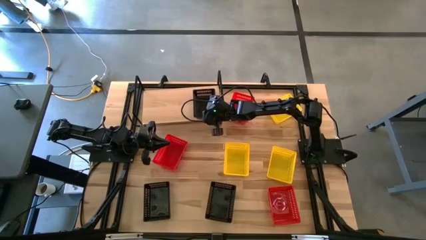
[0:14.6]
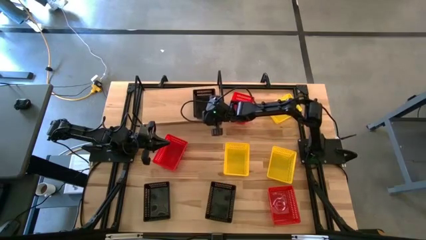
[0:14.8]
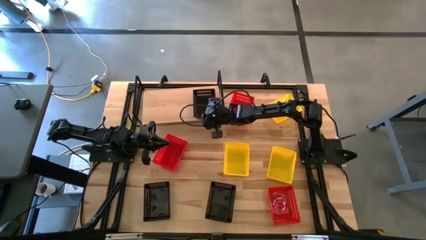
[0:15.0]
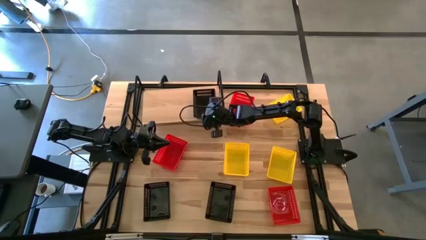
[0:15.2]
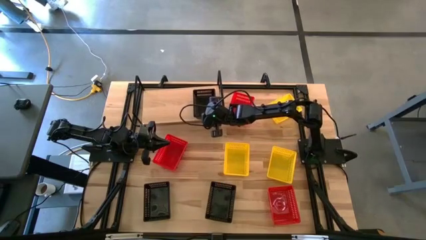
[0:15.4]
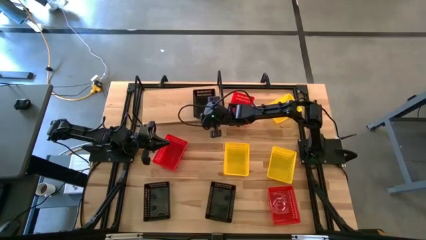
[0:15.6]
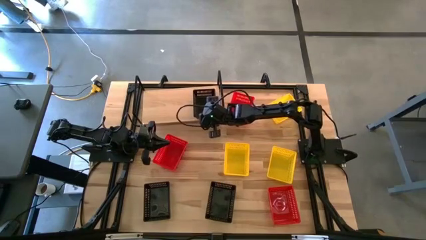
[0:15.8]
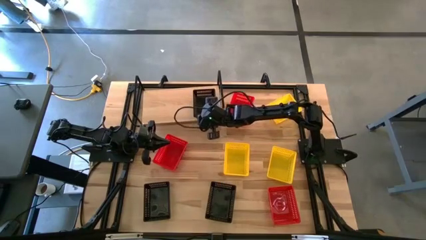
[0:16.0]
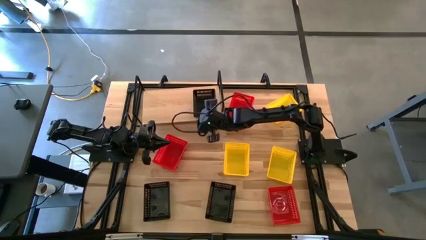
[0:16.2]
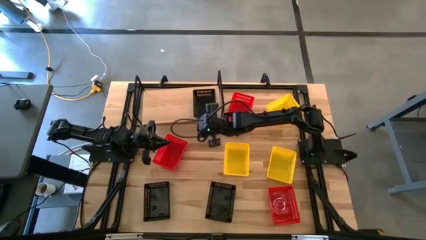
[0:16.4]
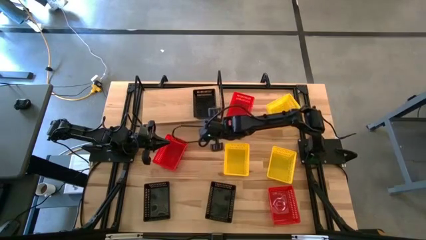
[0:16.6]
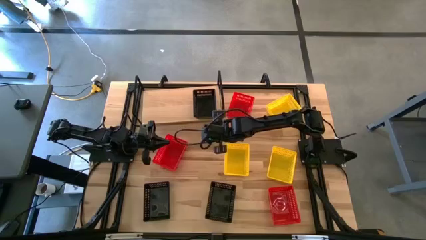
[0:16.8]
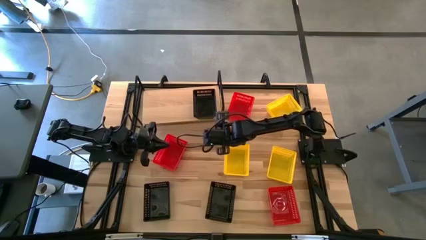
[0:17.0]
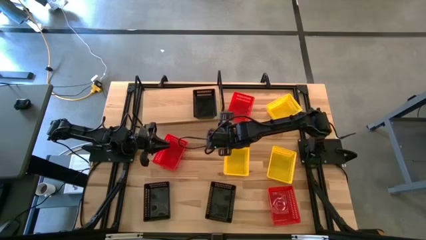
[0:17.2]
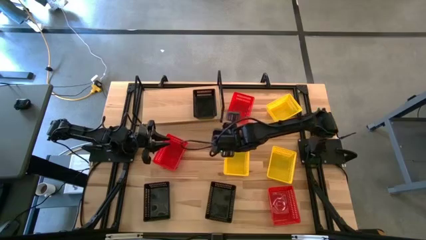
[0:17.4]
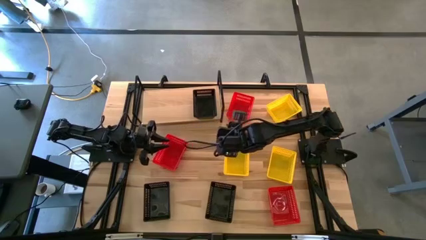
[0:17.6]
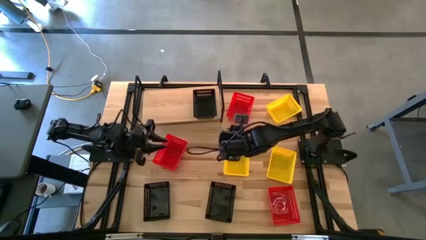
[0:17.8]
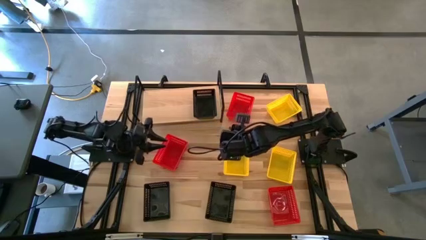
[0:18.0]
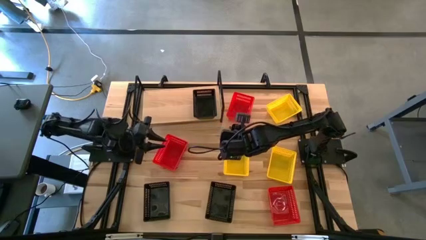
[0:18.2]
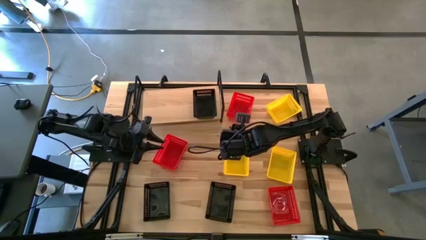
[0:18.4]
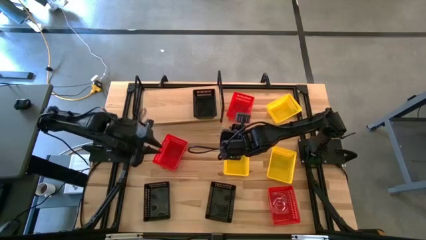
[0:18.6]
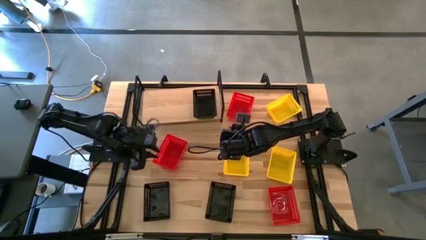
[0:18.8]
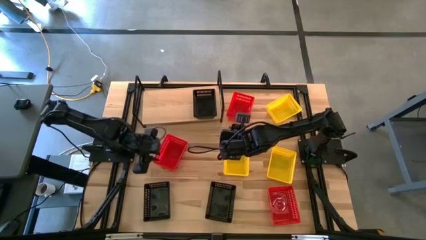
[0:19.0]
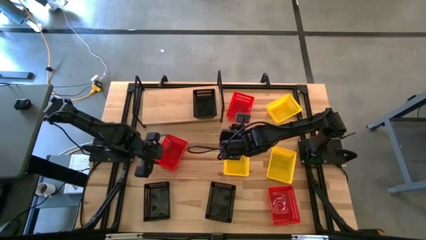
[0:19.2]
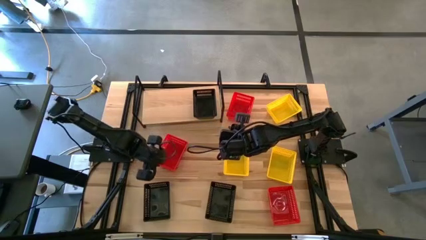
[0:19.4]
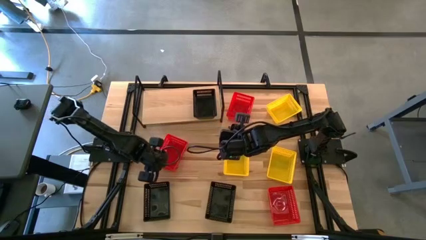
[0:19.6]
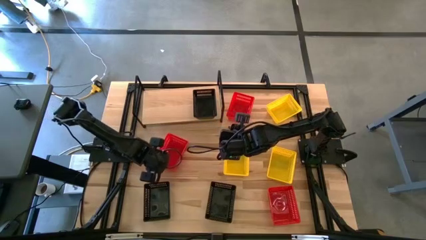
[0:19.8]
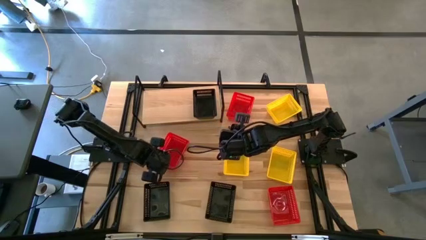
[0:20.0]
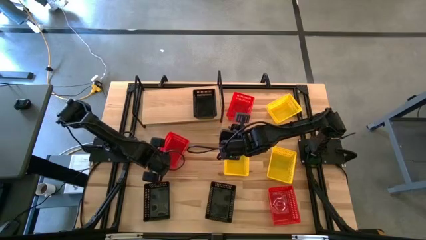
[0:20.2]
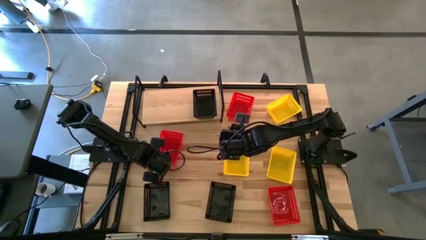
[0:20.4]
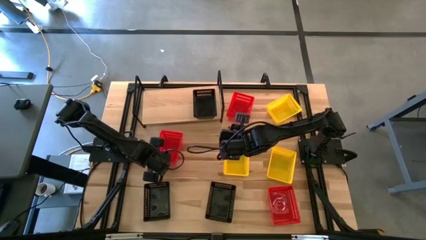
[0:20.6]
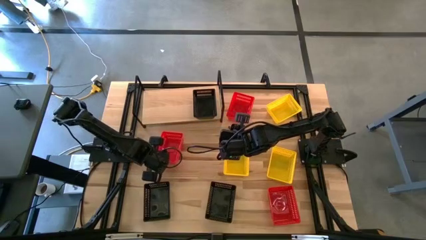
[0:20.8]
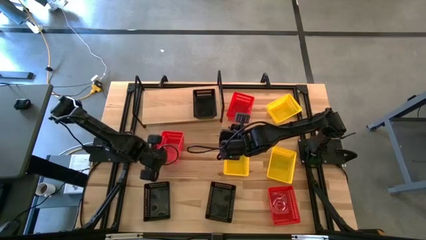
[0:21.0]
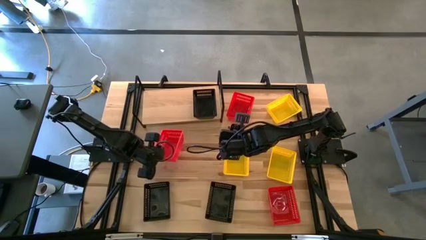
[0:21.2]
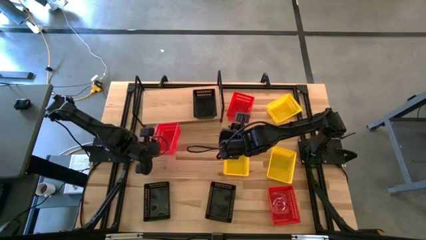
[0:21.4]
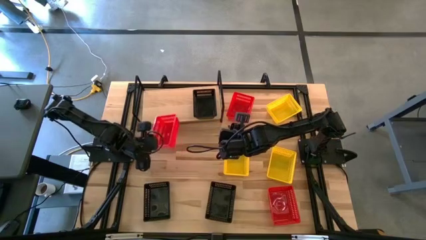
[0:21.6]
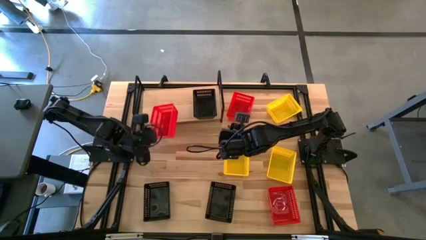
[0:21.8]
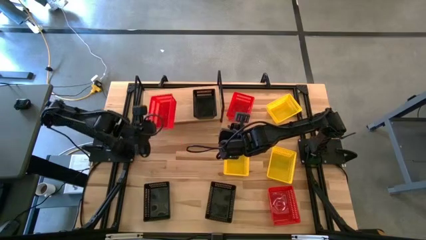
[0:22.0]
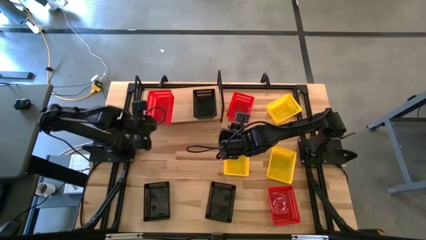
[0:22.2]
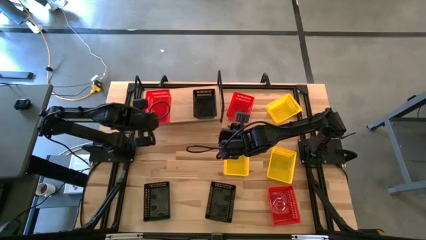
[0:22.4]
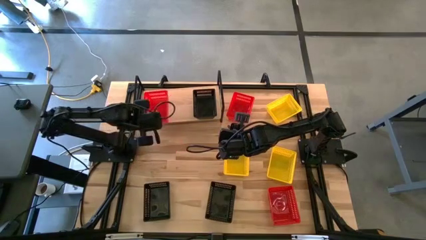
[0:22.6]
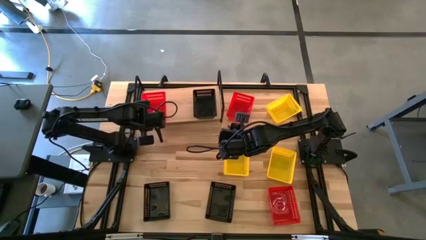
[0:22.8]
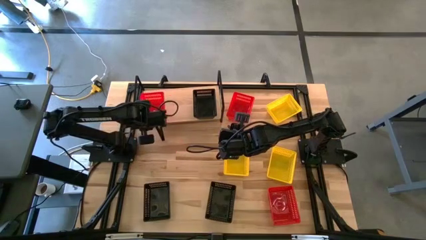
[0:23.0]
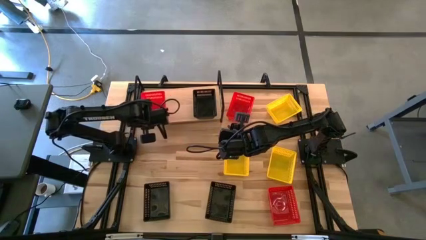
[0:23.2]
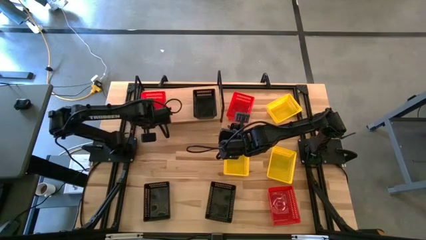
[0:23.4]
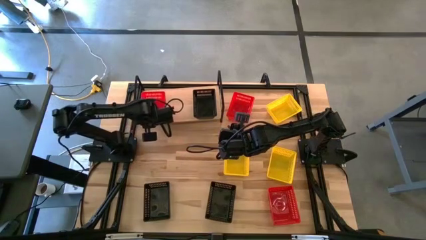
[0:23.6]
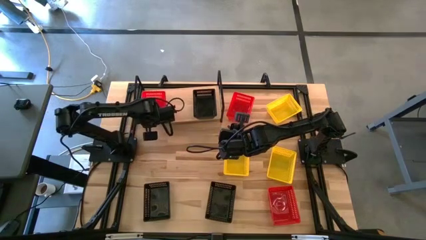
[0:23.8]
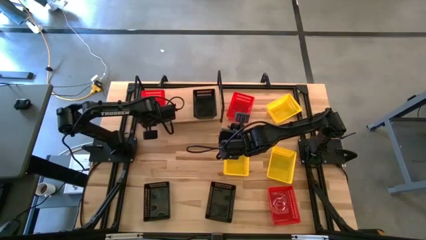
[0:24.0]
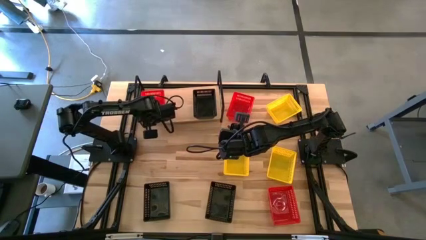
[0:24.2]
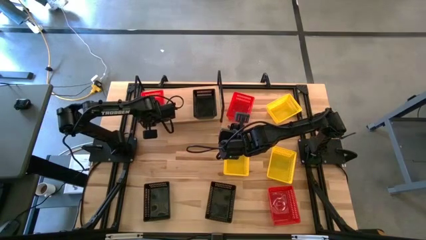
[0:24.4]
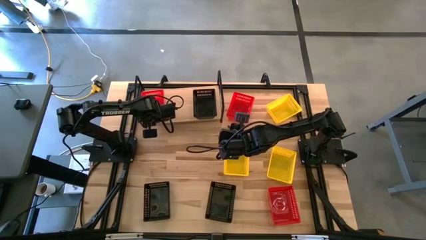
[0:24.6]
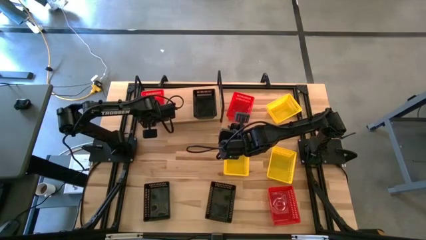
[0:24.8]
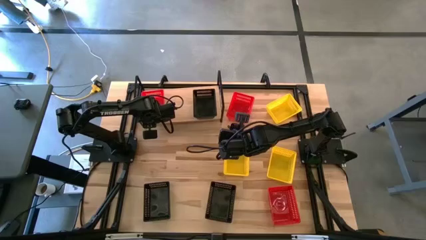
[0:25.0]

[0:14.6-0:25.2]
Task: Stack baskets on shelf by color
Put the left red bin on the shelf

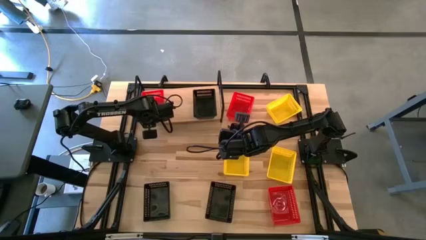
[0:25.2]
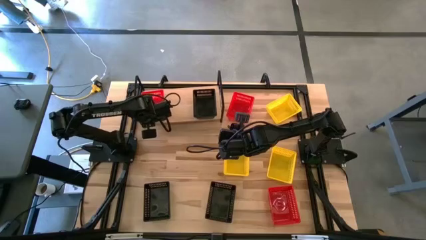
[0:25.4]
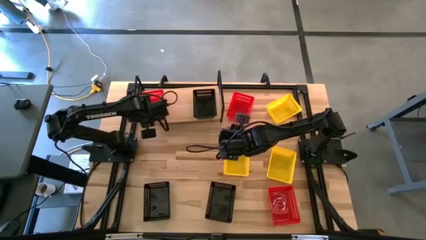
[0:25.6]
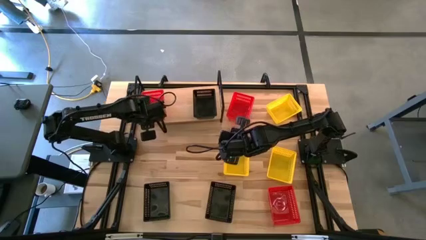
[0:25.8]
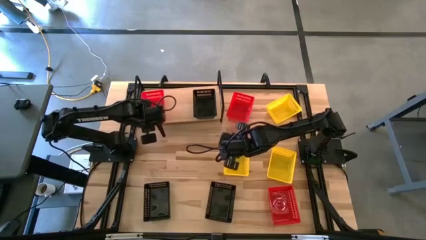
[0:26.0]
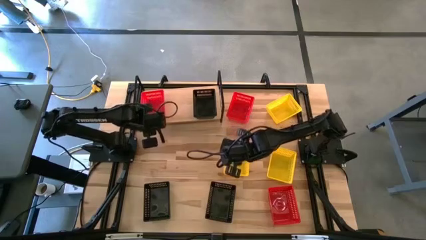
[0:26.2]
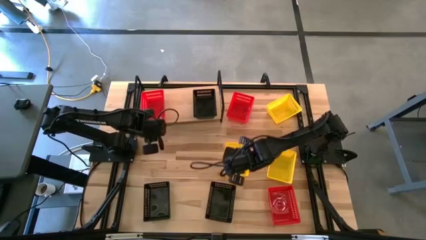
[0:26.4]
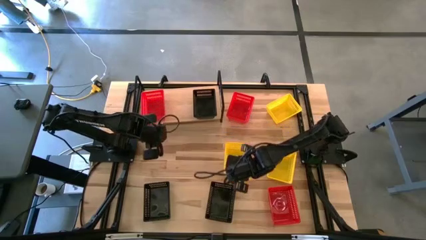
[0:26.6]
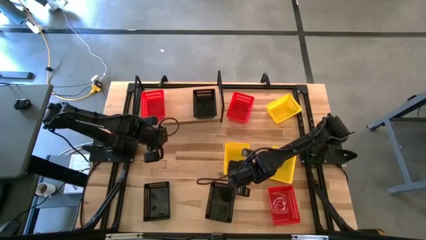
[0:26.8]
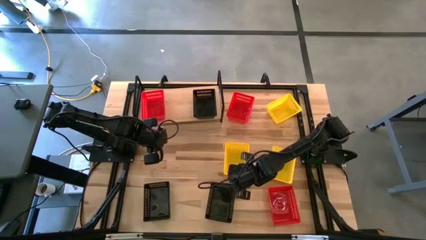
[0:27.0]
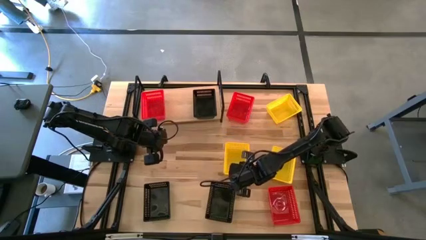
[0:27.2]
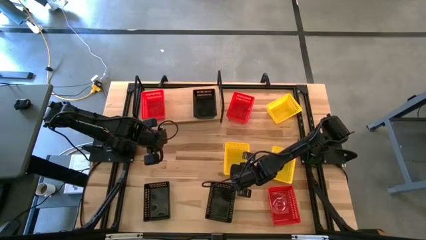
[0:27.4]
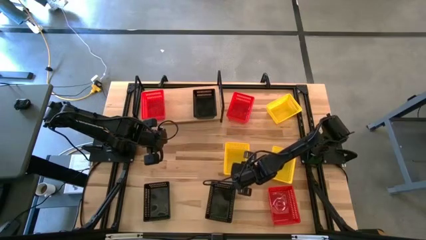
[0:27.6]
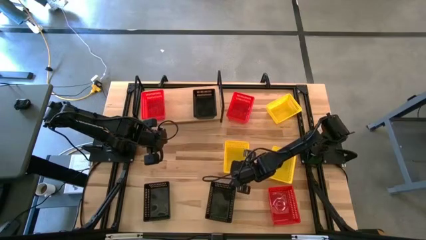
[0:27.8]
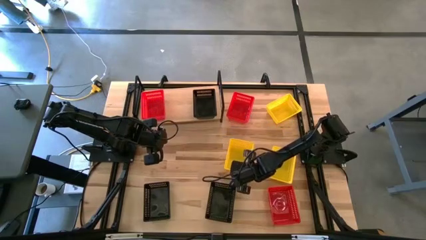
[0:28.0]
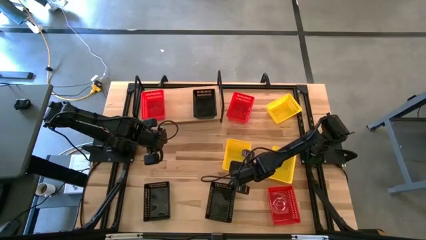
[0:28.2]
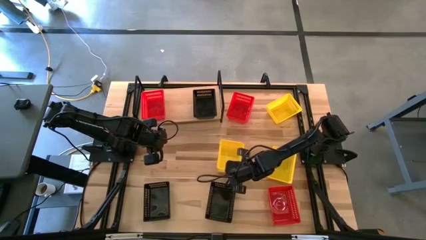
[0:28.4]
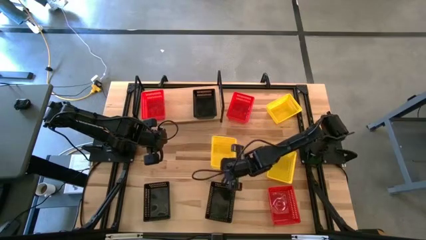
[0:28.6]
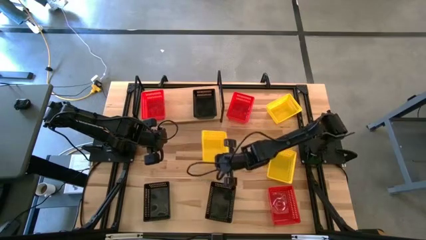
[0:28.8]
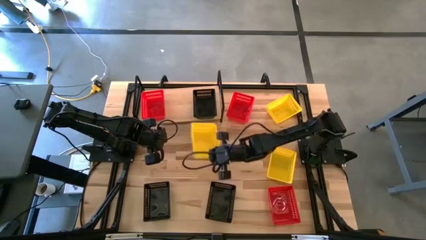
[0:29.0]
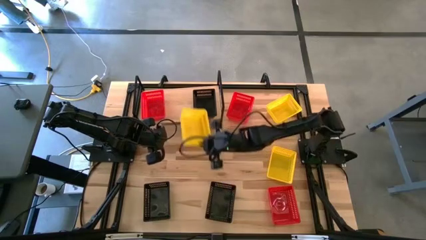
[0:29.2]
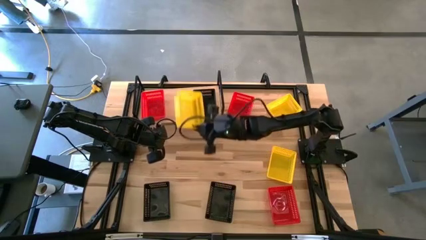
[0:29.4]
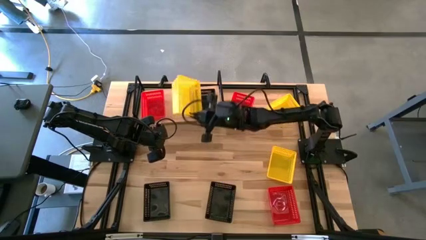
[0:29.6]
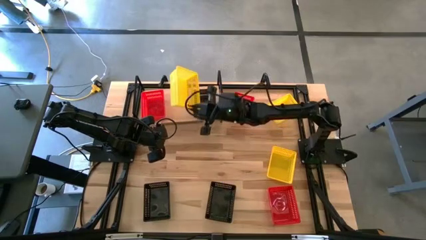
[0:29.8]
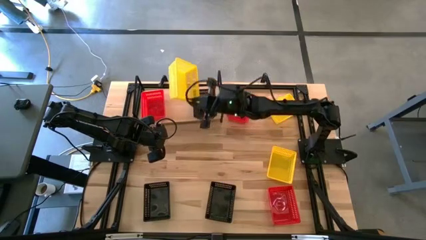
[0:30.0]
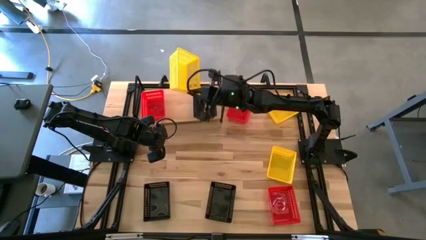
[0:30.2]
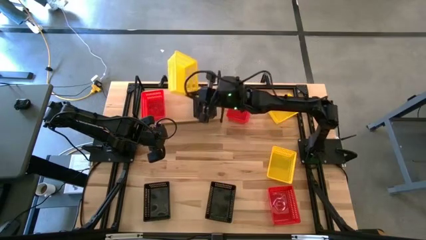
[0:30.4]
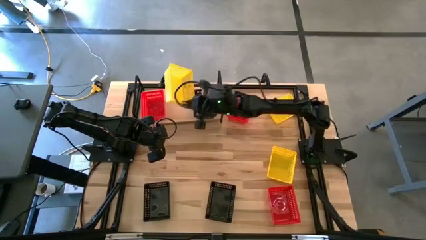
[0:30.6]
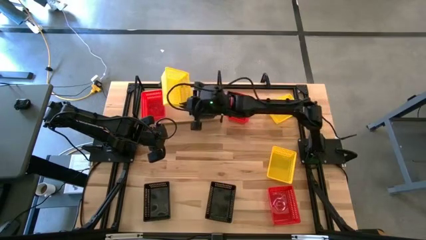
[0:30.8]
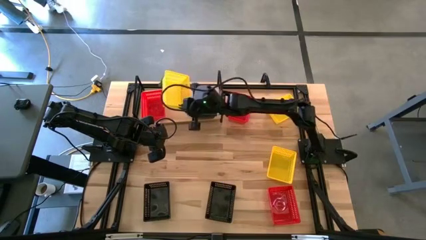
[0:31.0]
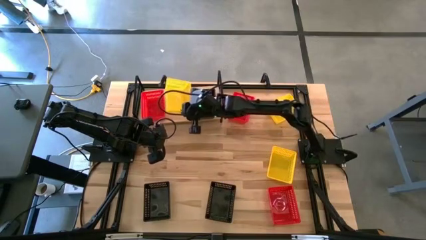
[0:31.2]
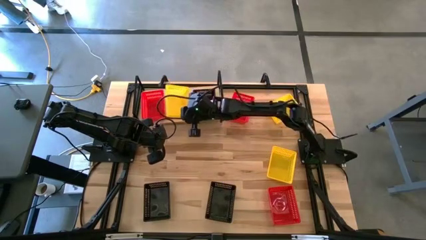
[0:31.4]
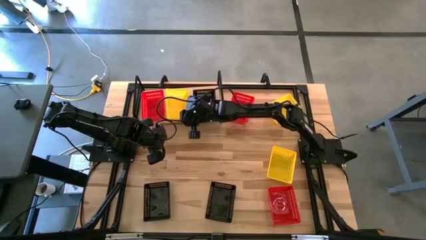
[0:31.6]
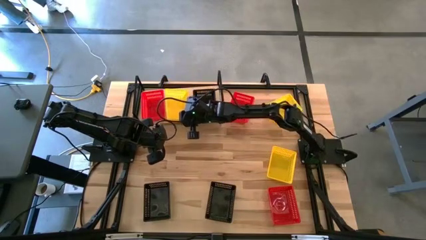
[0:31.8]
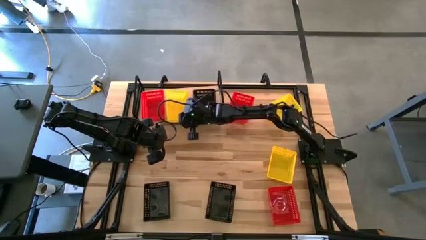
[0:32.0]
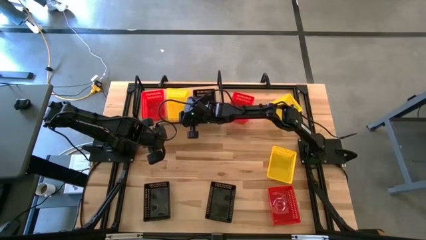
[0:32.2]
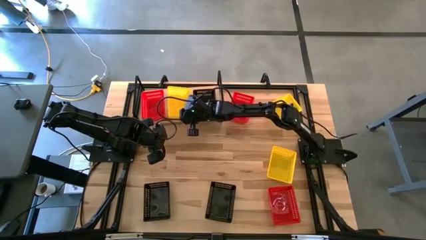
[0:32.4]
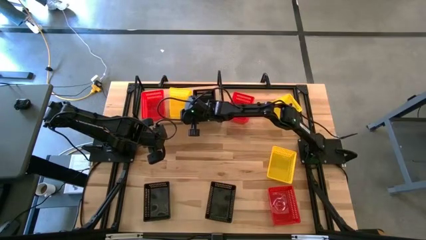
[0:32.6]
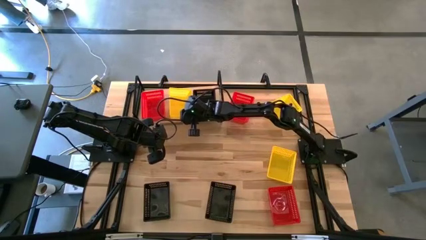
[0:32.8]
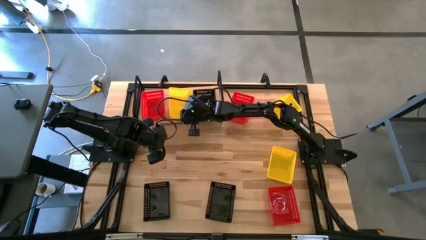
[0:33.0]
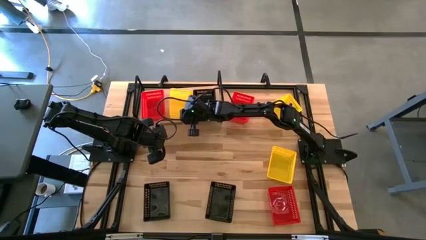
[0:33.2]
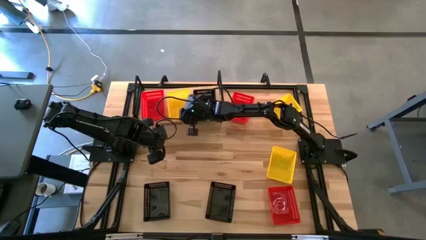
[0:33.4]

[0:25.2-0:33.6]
Put the left yellow bin on the shelf
